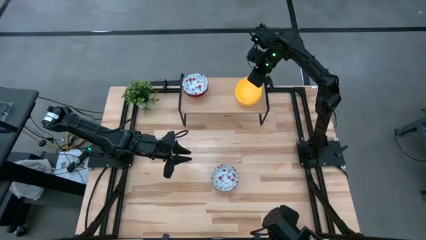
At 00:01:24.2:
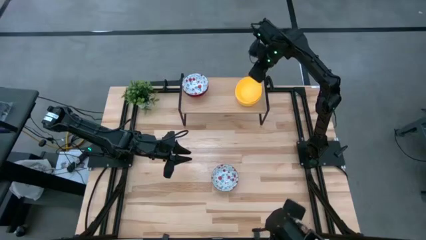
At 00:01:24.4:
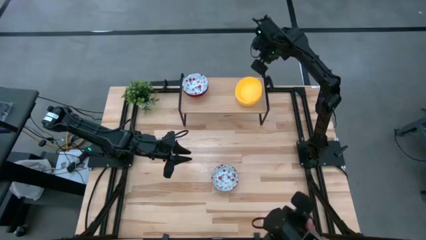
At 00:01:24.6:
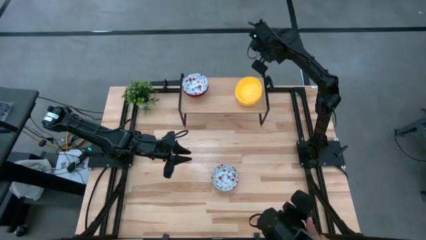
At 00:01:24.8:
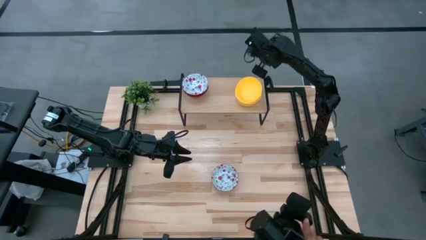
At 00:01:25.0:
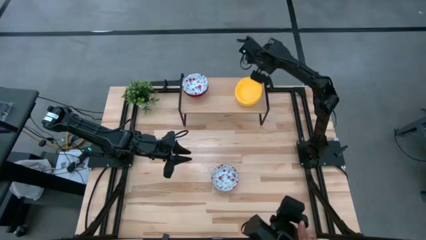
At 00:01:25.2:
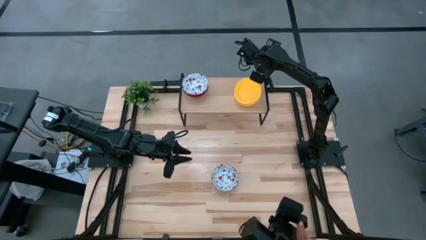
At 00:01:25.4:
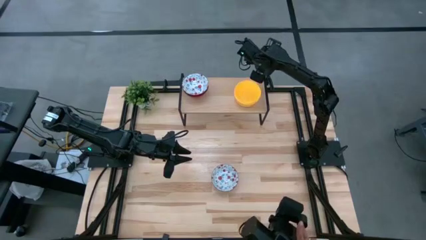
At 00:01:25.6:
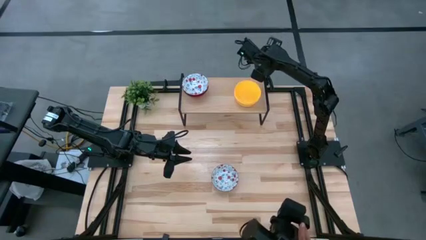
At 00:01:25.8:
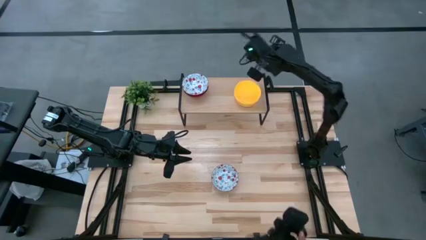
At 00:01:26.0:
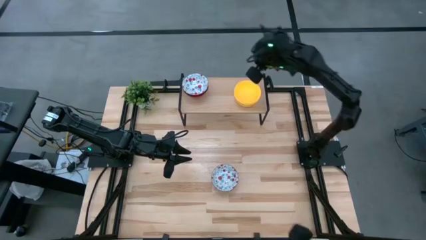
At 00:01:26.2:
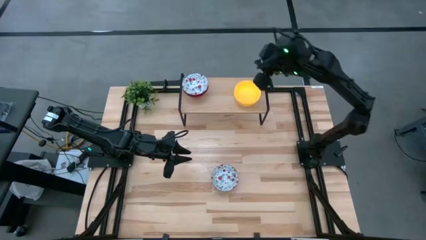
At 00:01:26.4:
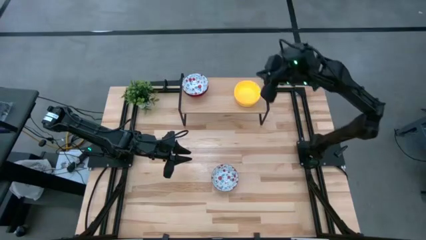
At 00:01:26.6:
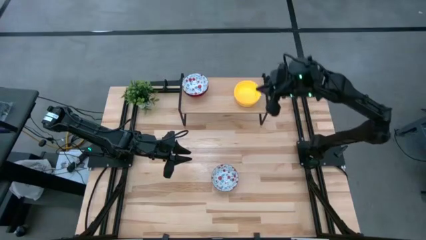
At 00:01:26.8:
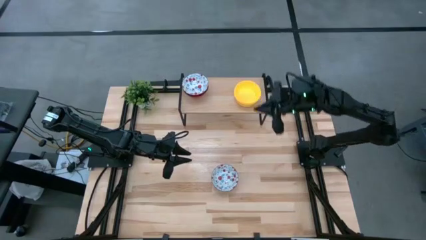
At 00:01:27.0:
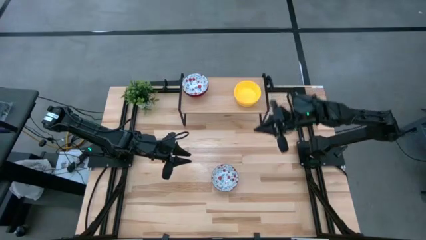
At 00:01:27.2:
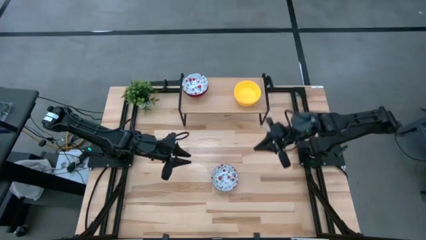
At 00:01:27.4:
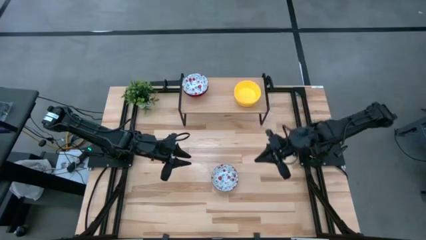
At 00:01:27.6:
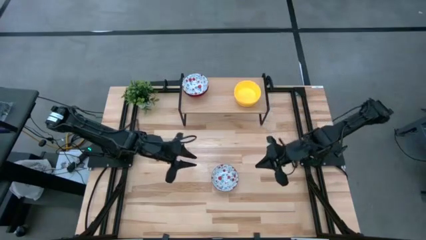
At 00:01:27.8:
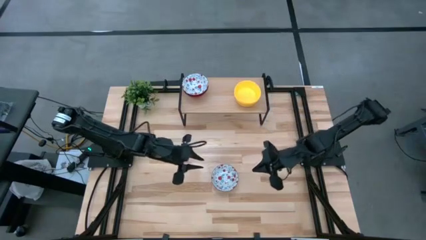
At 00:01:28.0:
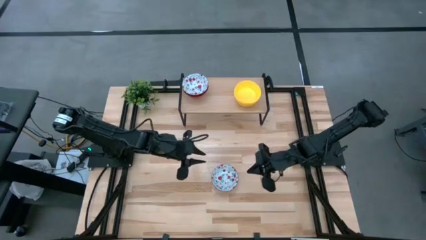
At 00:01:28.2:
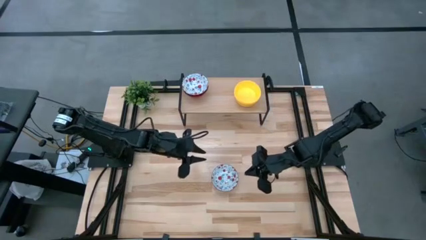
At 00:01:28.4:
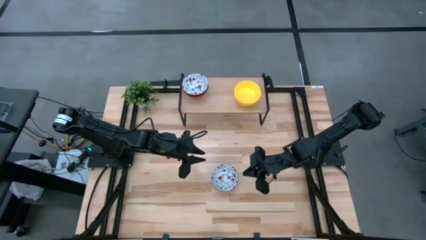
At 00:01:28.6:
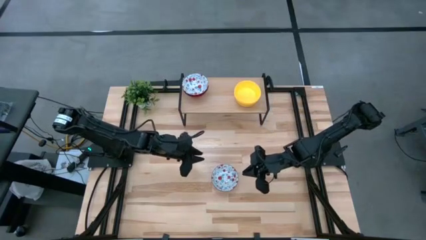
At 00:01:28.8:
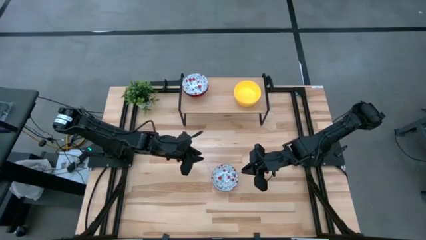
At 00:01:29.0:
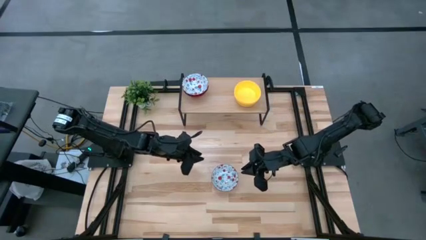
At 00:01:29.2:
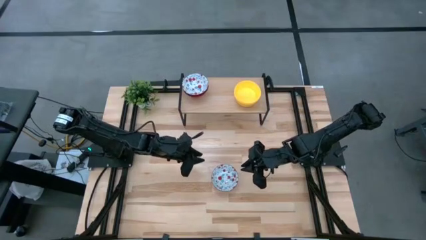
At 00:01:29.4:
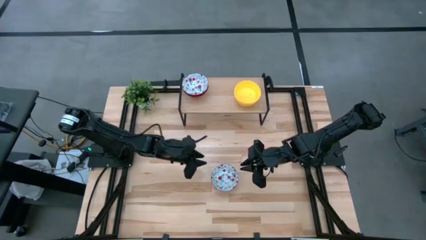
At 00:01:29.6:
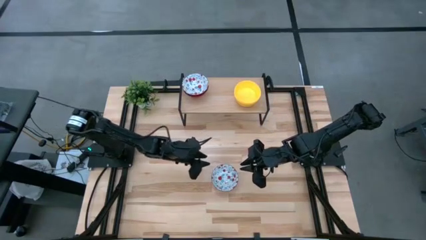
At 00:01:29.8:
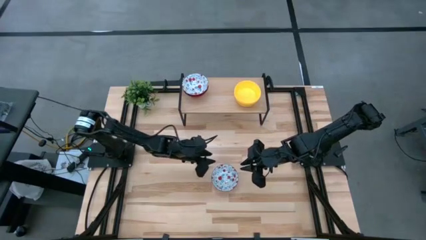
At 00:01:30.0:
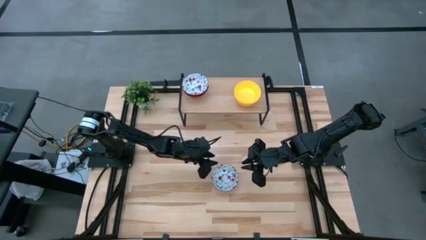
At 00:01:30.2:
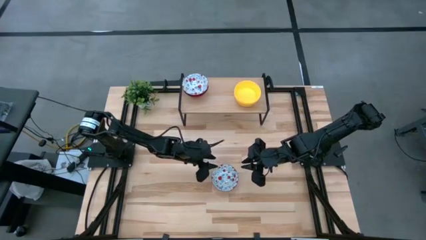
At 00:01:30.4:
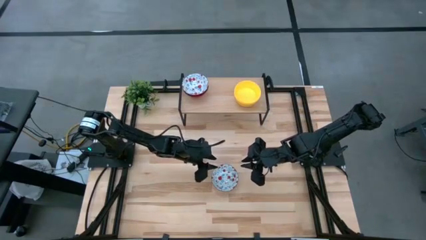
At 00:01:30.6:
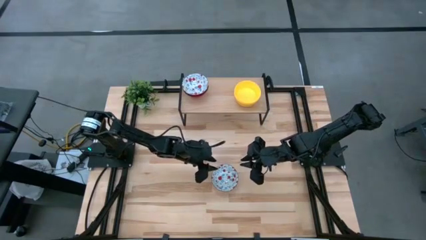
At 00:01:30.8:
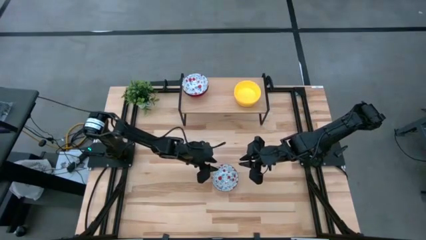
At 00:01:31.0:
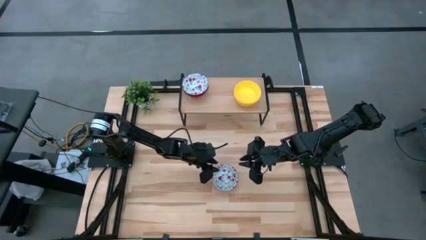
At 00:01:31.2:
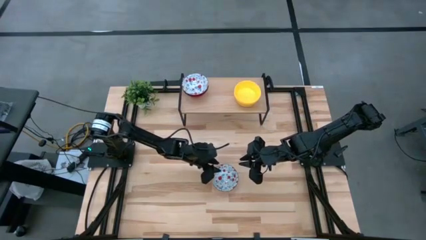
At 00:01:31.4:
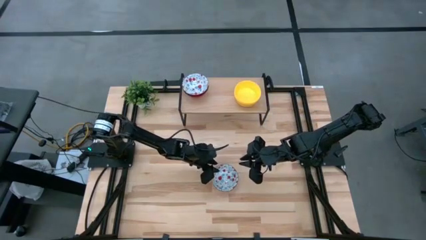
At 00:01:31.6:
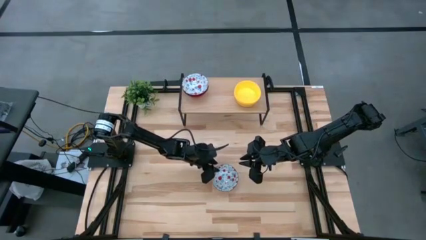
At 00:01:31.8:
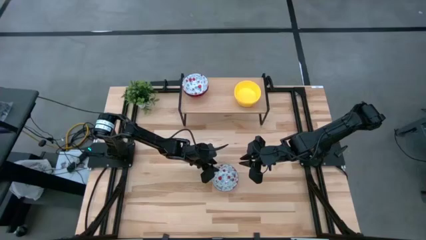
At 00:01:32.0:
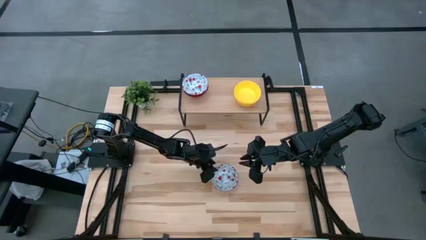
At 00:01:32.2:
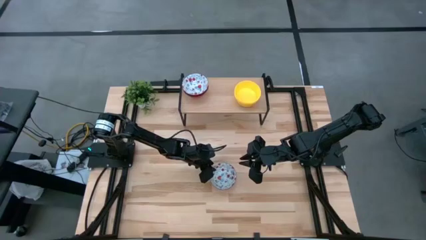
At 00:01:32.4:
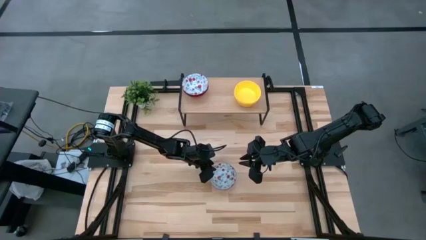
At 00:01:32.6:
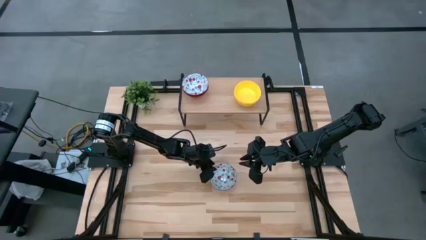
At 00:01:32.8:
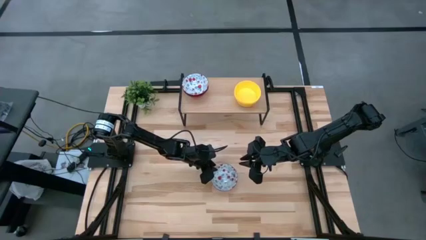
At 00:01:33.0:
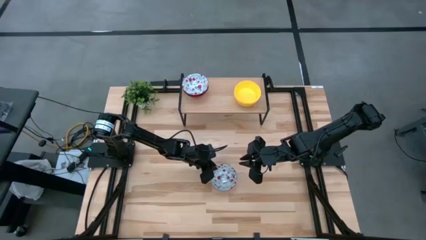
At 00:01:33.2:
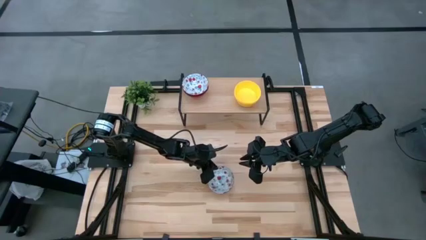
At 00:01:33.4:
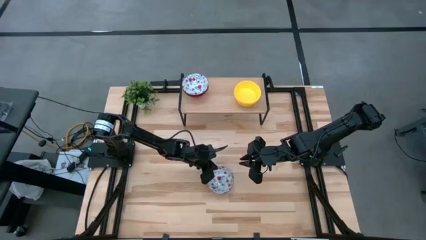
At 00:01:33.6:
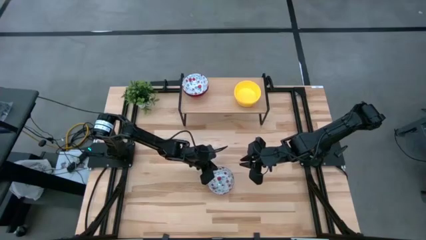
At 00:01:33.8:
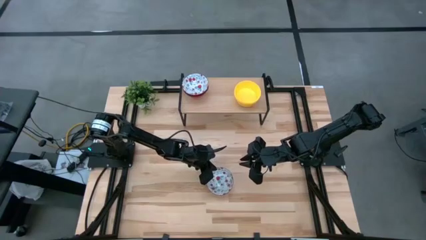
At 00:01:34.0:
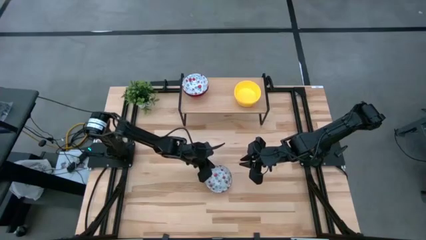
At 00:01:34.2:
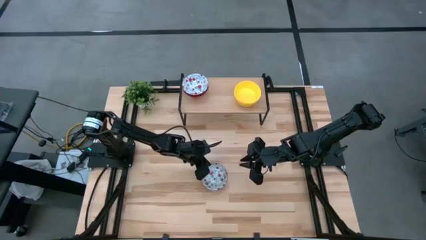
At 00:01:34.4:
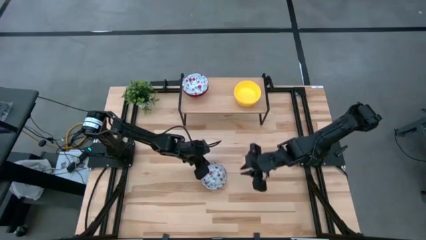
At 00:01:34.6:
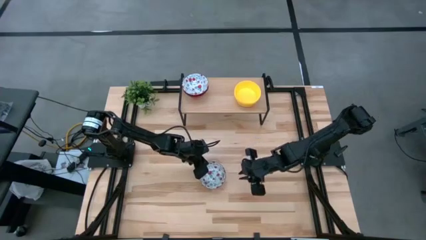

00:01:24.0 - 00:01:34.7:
Task: Pick & Place Mini bowls
Stack the red and blue bowl on top of the other red and blue bowls on the shelf
